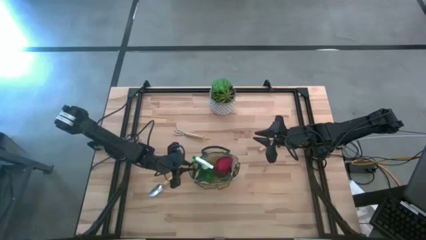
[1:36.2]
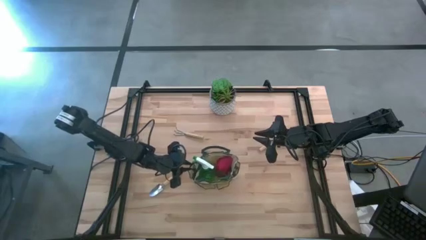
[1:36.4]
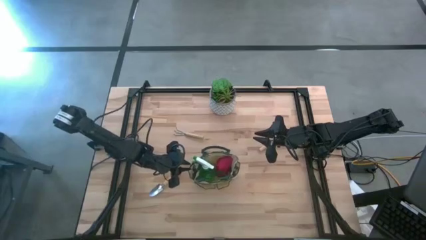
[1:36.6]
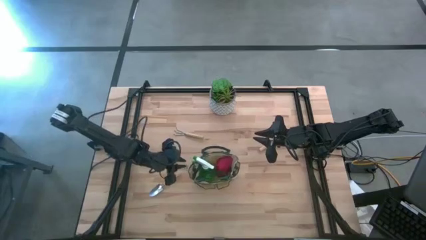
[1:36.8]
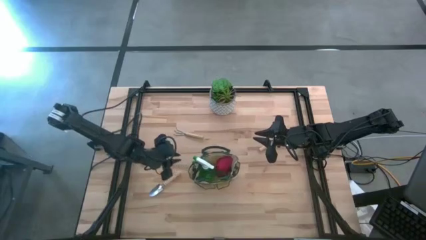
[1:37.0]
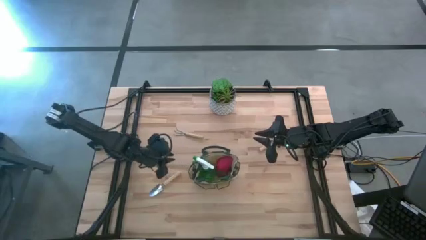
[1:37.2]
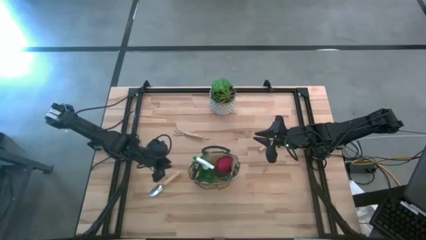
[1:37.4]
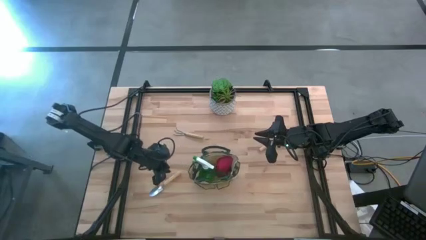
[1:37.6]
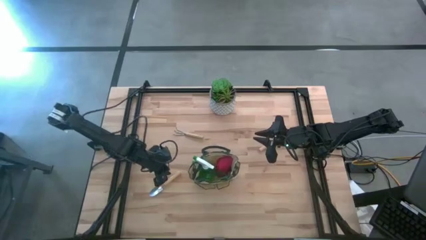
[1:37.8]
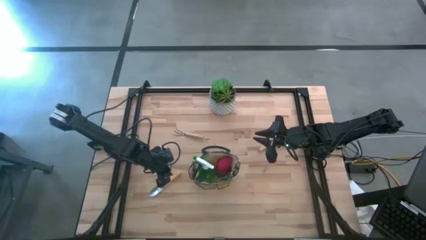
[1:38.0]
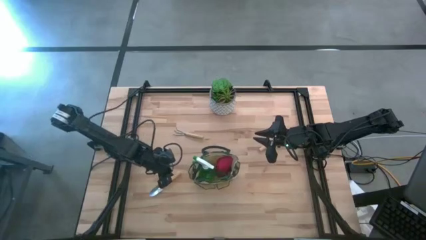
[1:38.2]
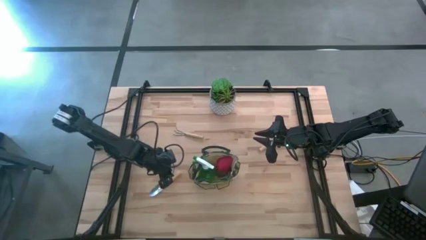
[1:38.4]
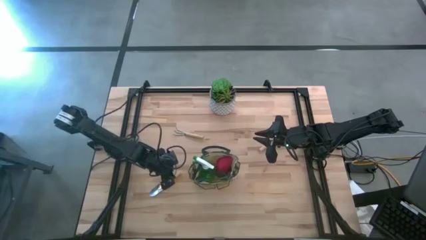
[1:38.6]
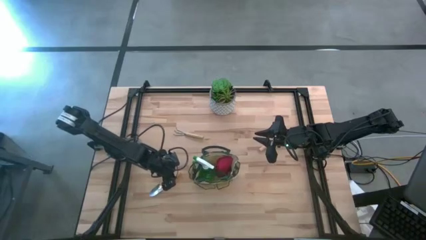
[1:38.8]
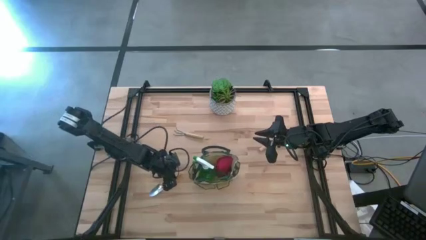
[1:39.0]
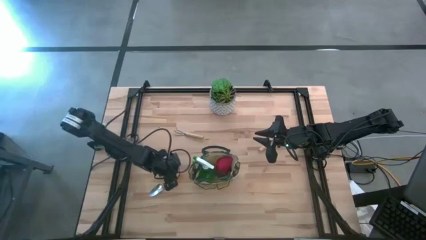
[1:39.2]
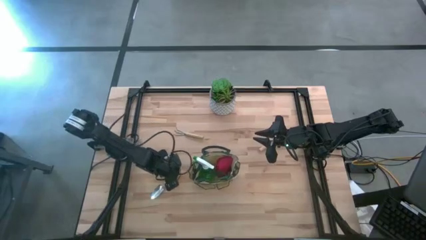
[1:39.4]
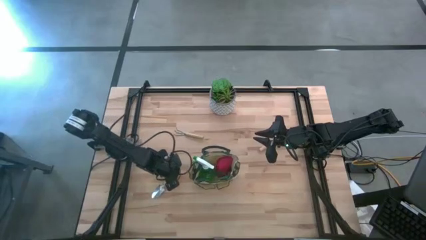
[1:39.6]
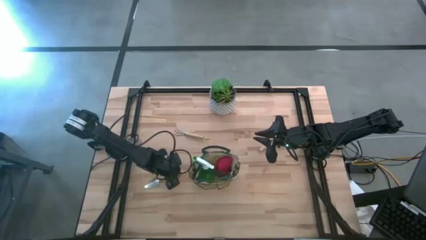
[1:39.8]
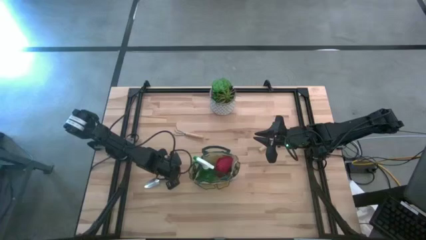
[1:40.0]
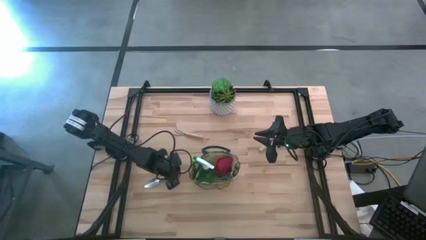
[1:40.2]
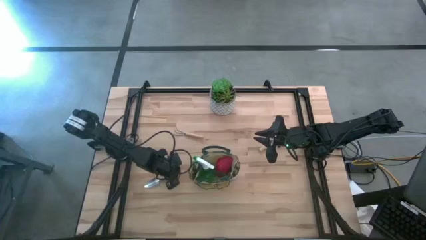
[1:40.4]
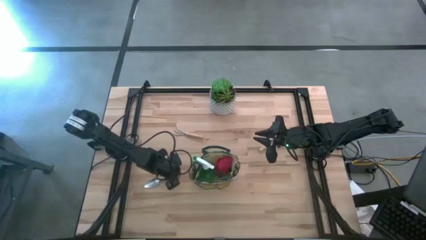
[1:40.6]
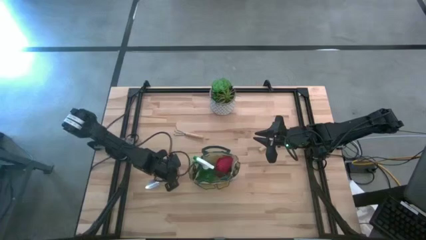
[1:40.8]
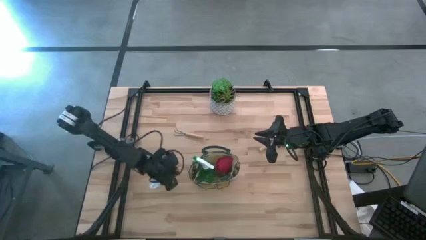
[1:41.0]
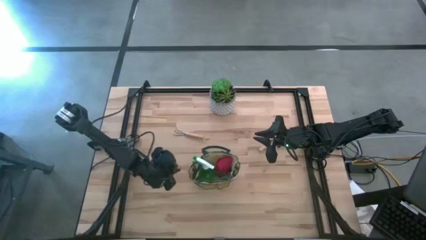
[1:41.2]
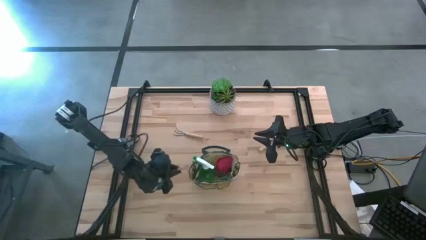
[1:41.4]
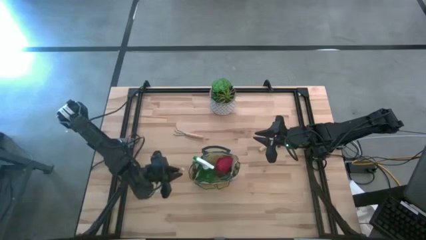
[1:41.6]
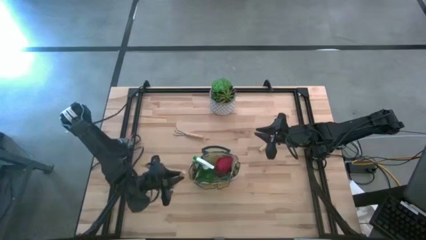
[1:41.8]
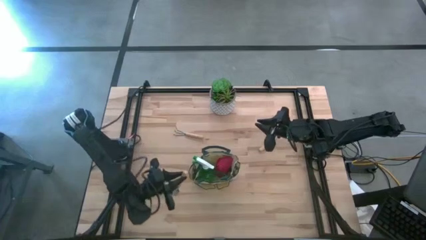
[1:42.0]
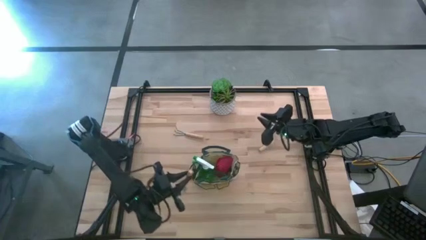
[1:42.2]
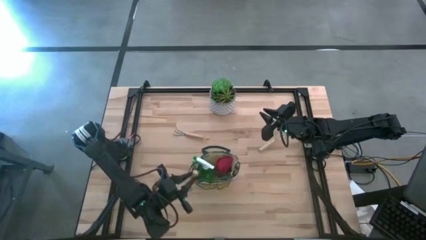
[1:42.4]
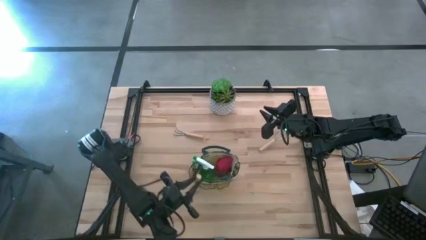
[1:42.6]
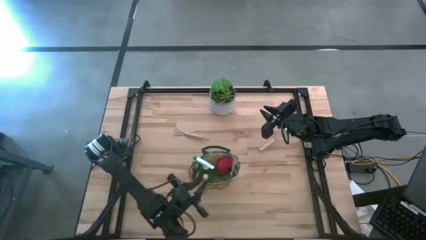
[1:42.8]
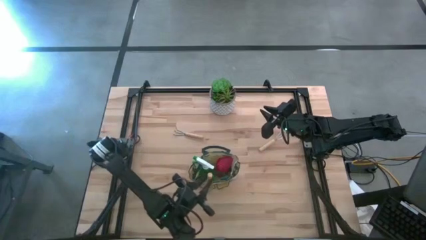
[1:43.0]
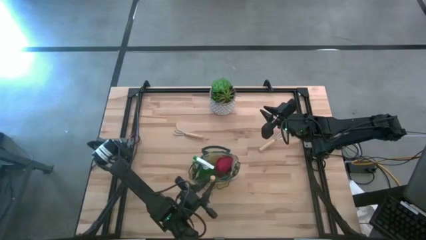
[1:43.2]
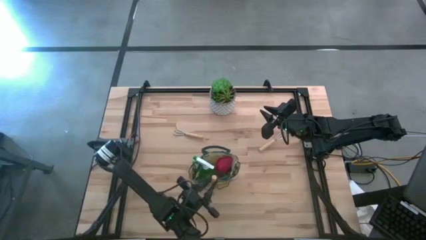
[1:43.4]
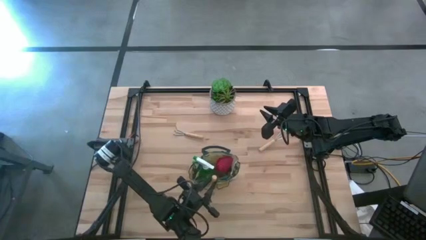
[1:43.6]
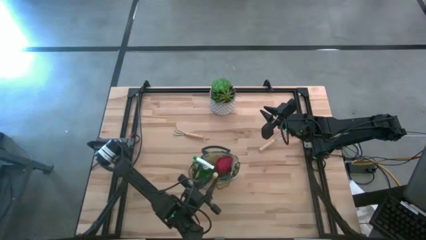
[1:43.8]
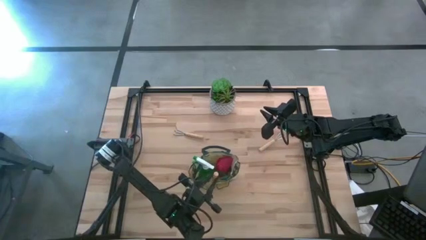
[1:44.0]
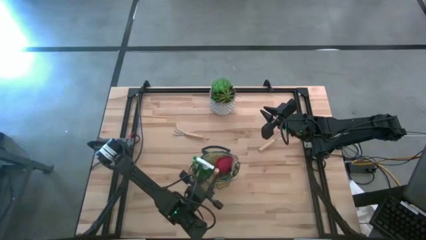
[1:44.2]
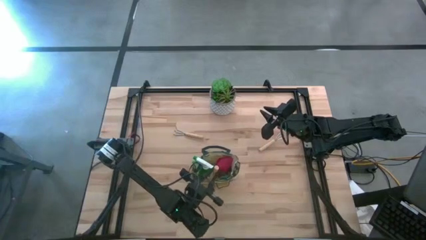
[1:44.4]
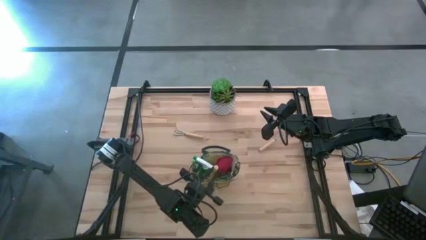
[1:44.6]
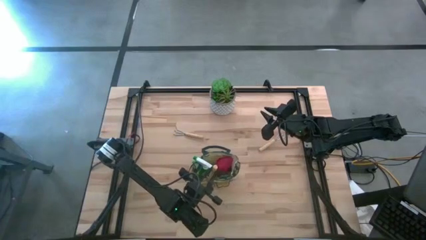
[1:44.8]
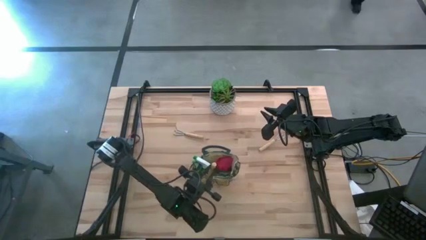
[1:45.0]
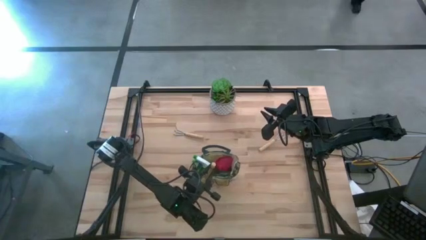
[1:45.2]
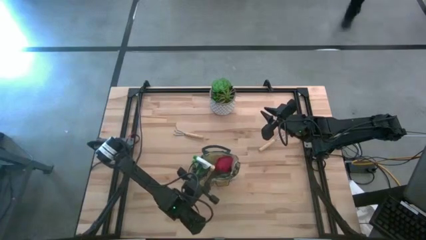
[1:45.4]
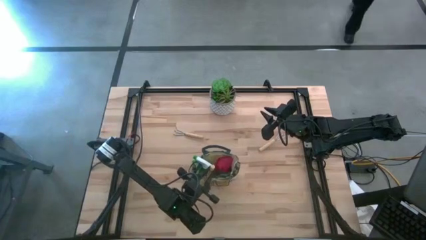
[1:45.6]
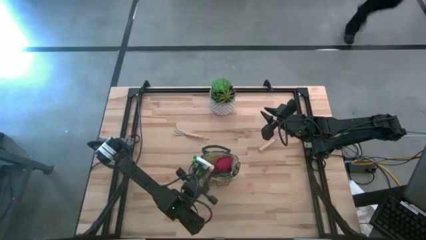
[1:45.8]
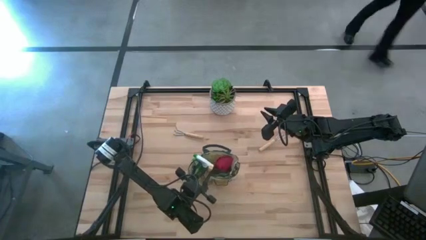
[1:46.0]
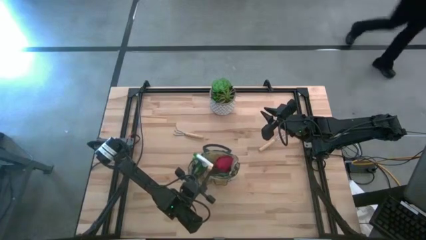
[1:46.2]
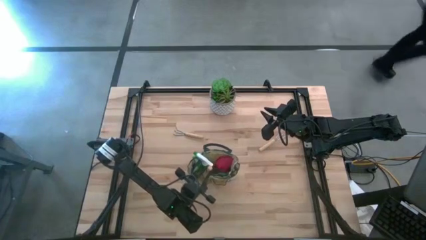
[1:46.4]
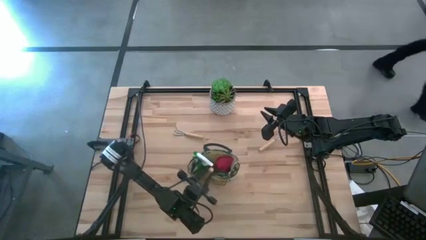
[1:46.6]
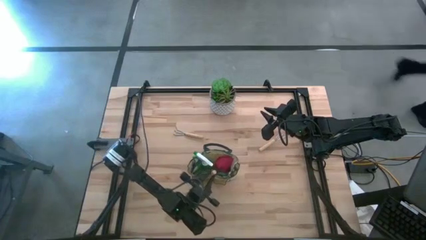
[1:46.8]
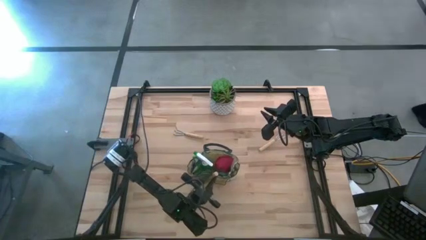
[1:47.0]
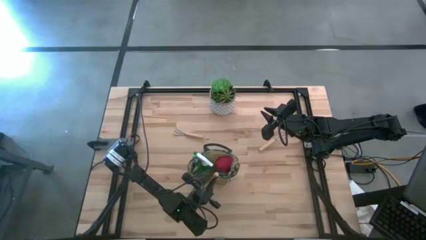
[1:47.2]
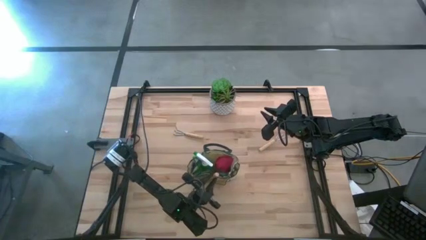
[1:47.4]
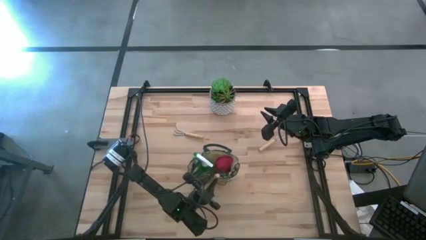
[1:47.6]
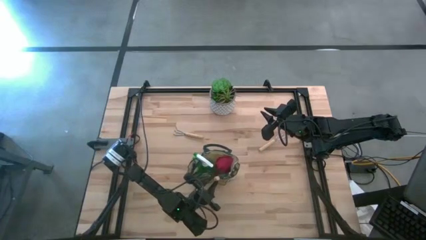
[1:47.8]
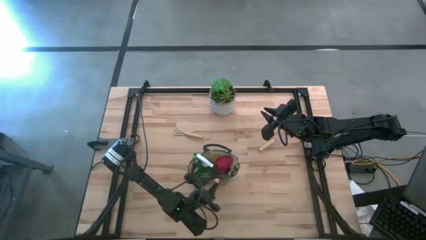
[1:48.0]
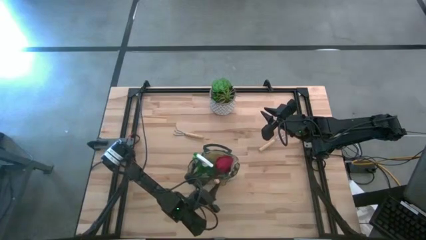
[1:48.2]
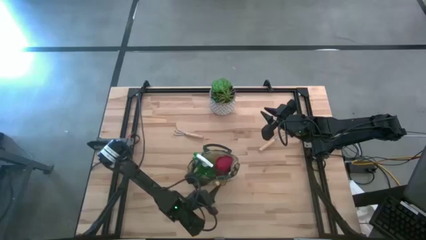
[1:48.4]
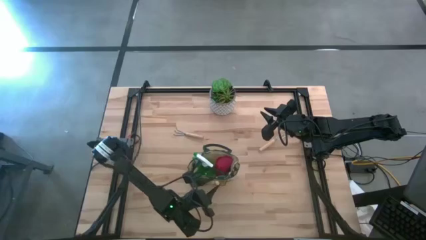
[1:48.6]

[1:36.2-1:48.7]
Task: Pick & Place Garden tools in Gardening bag
Put the light brown trowel into the white gardening bag

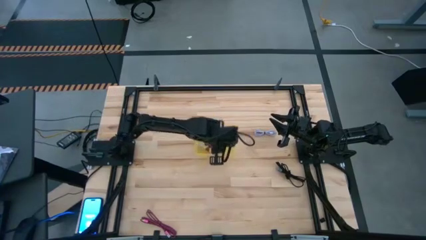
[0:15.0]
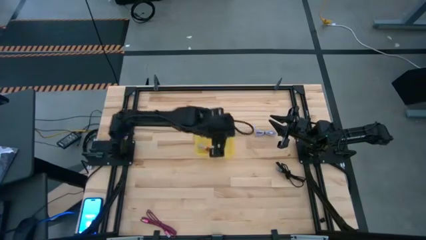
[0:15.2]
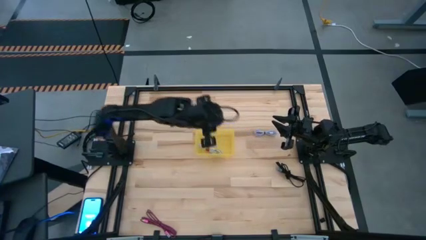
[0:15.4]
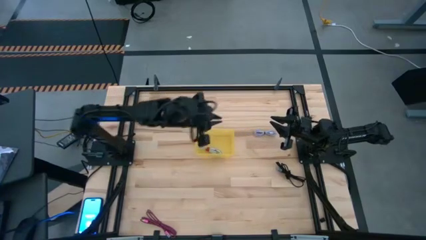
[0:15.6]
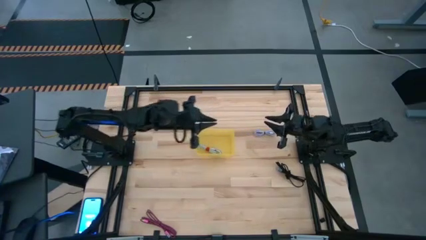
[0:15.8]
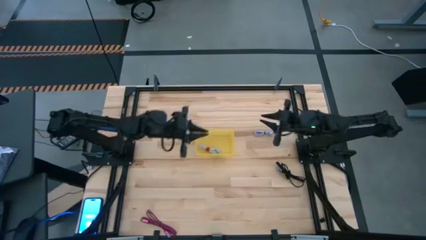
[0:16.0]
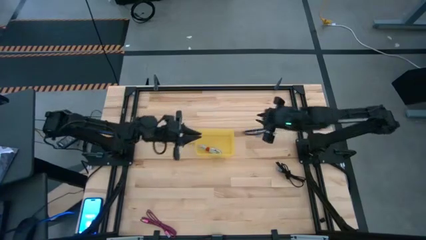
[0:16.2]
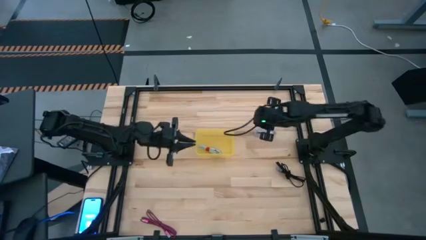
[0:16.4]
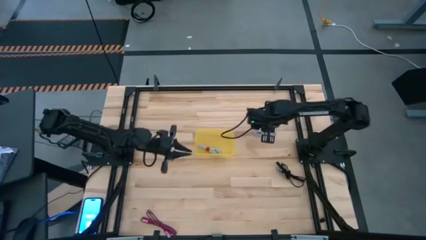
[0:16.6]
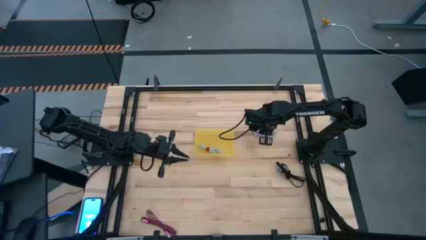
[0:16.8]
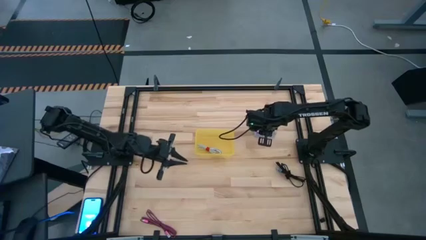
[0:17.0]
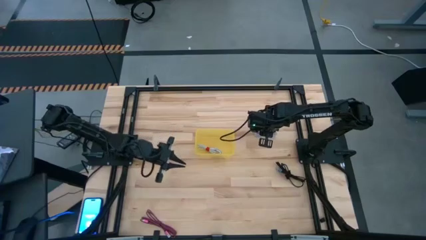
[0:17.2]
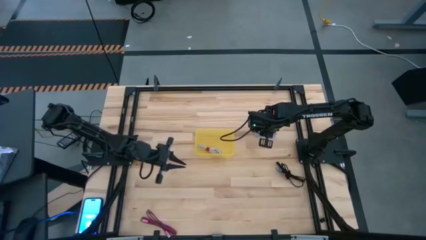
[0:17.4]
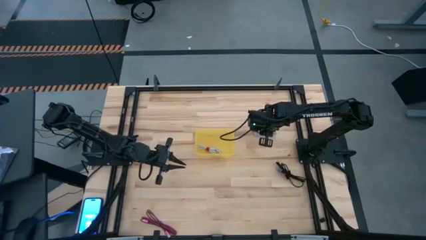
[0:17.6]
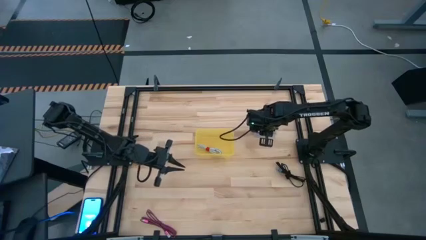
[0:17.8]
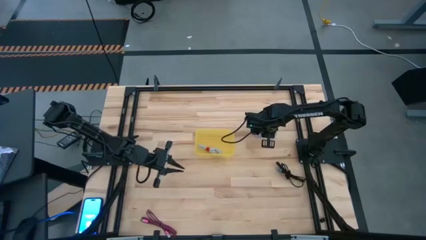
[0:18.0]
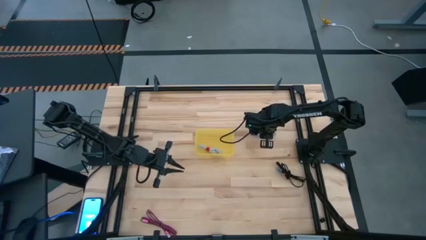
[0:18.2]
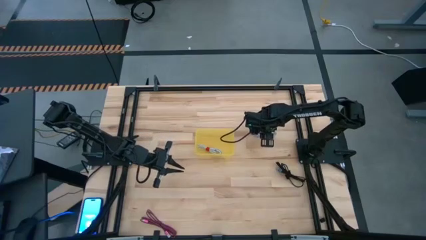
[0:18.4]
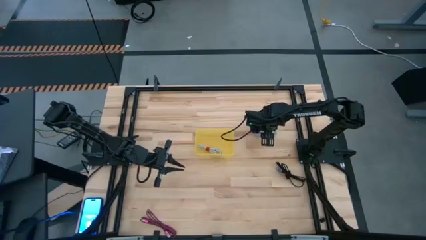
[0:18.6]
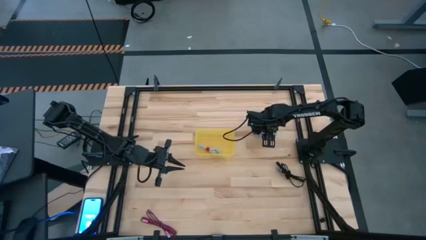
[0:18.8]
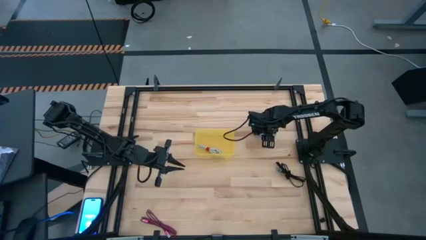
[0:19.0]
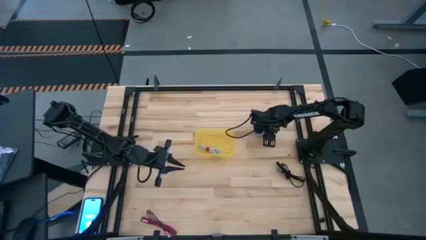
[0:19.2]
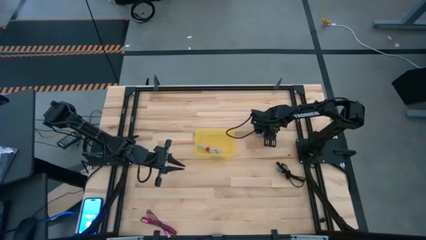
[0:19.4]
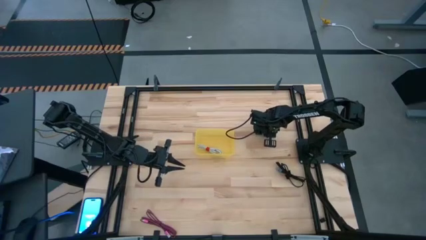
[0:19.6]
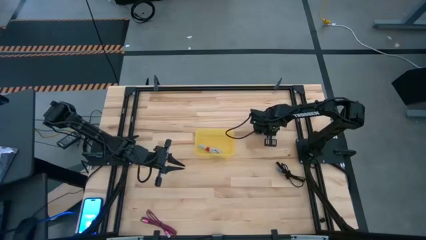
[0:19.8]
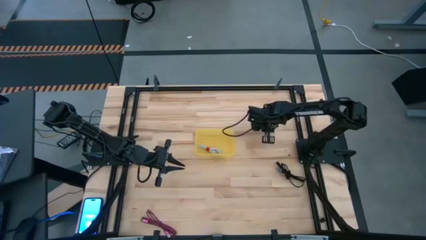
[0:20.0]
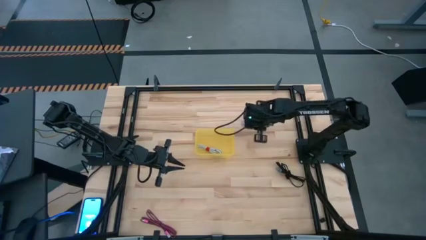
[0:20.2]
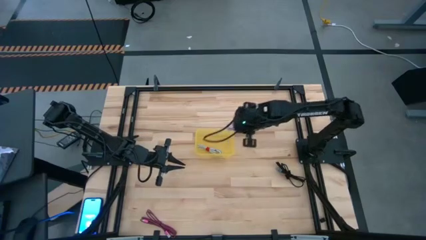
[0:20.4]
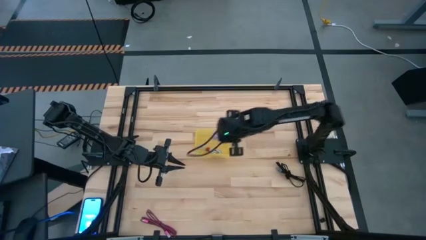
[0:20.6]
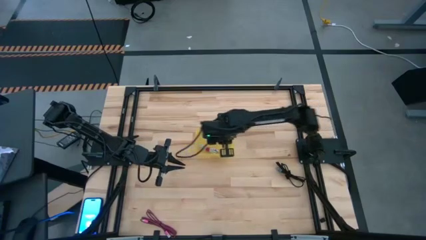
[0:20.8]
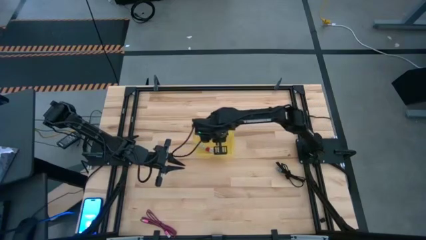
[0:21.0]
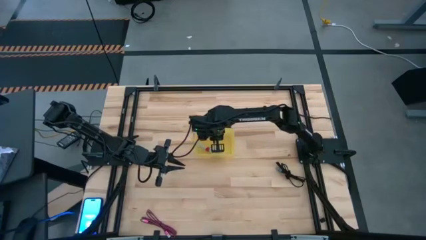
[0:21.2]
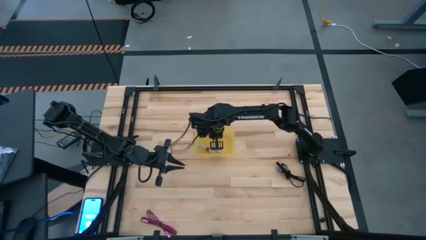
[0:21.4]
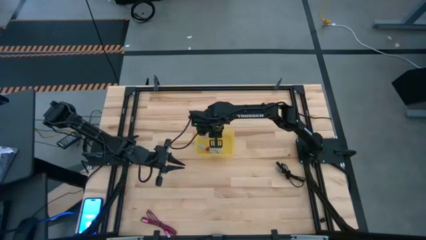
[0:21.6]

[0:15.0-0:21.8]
Task: Pick and place USB-C Cables
Put the white charger cable into the yellow transparent bin
